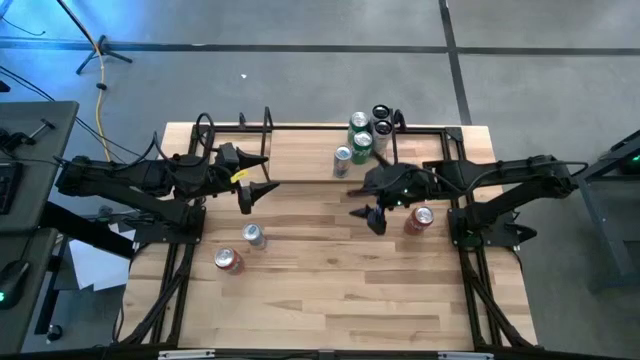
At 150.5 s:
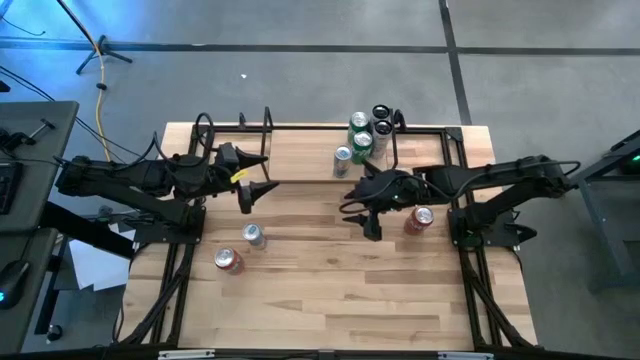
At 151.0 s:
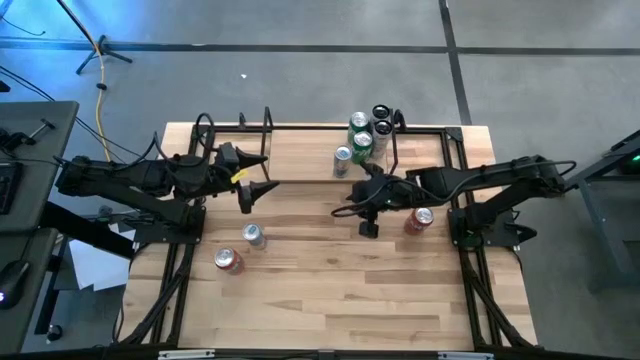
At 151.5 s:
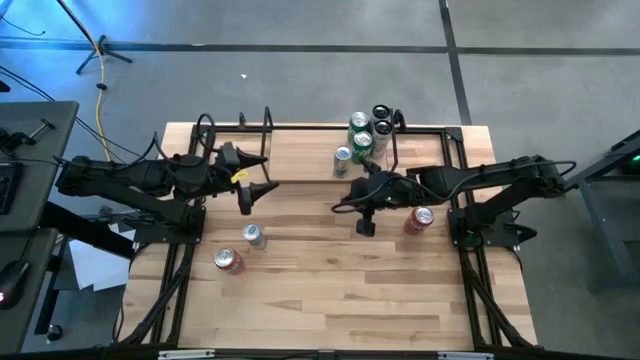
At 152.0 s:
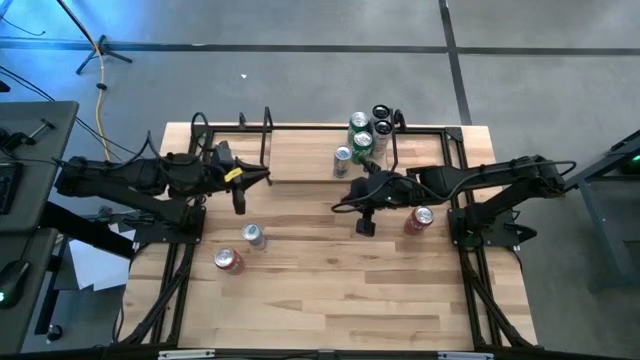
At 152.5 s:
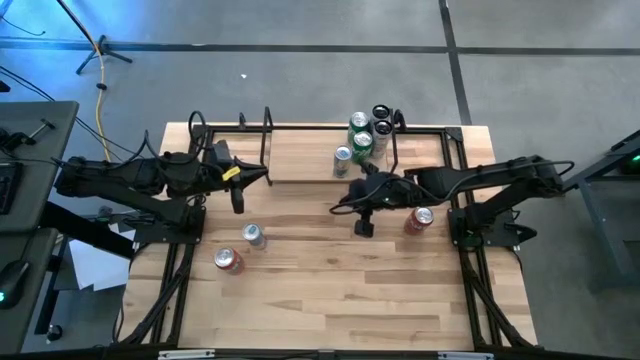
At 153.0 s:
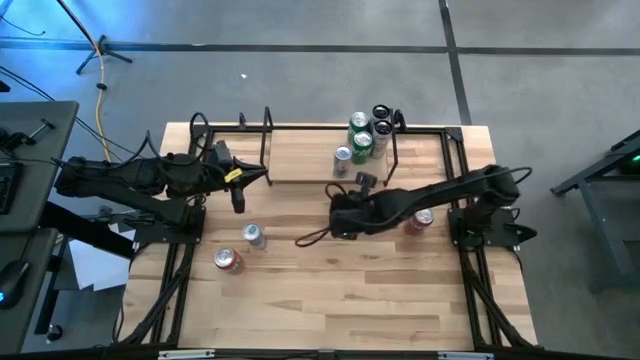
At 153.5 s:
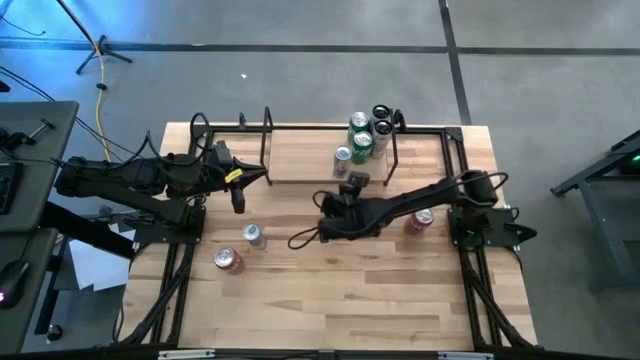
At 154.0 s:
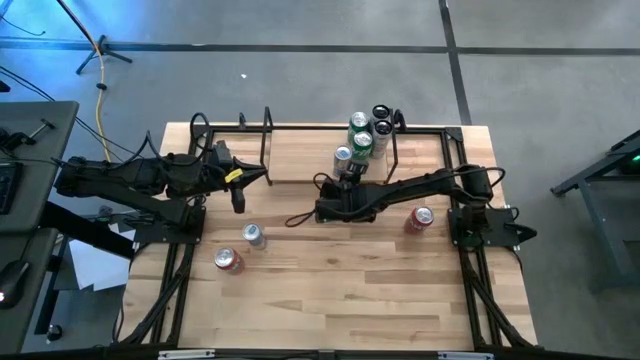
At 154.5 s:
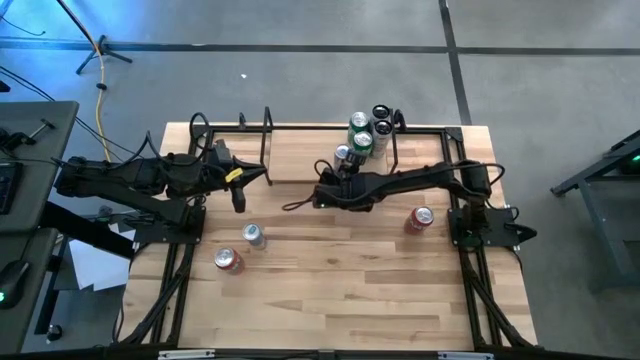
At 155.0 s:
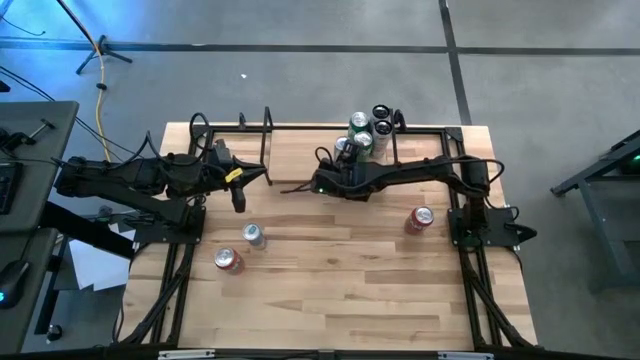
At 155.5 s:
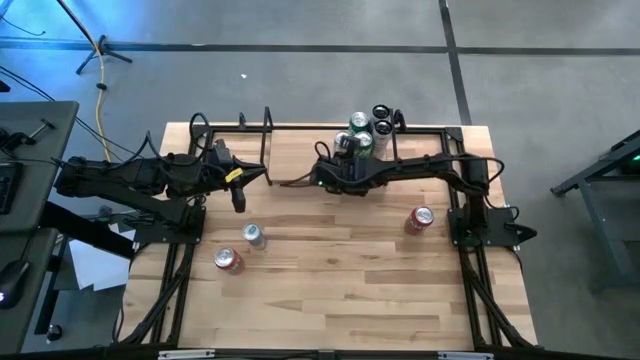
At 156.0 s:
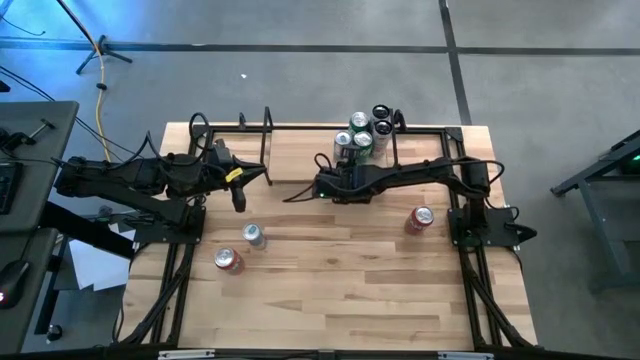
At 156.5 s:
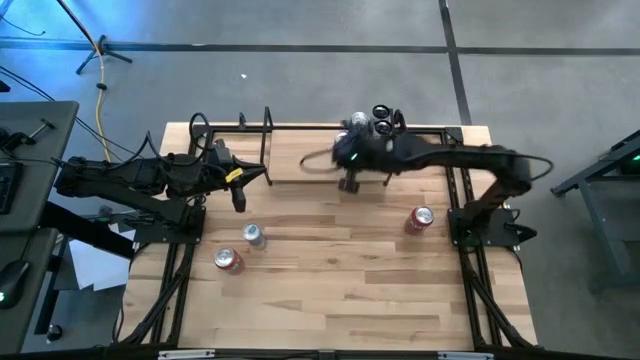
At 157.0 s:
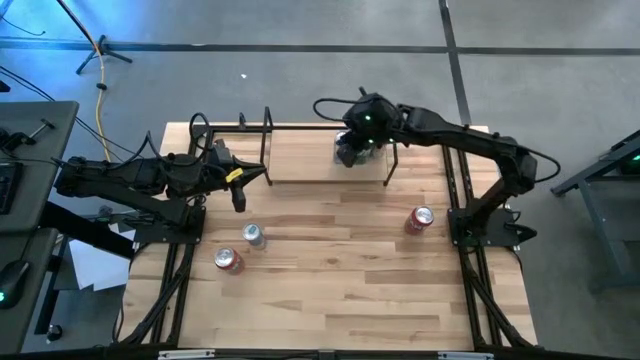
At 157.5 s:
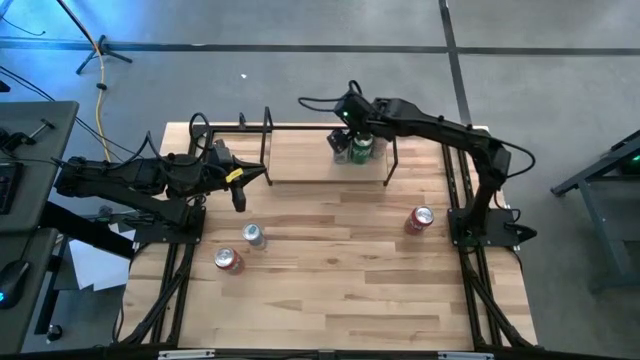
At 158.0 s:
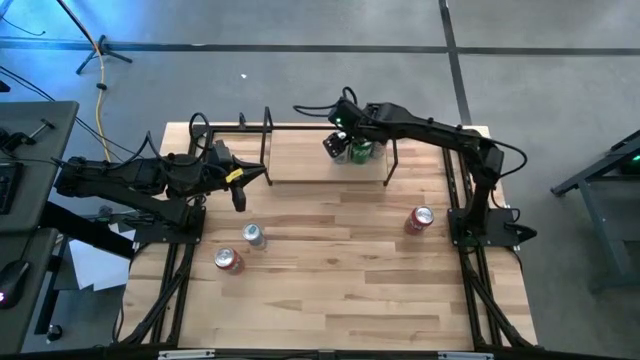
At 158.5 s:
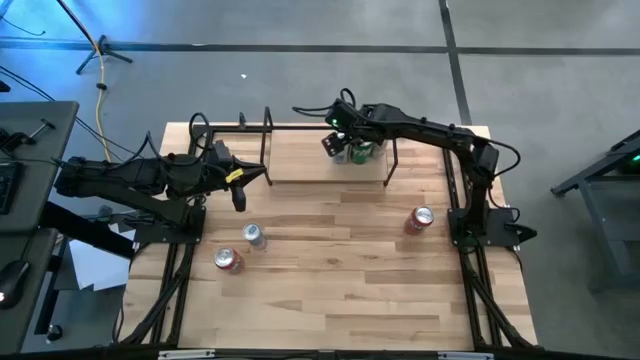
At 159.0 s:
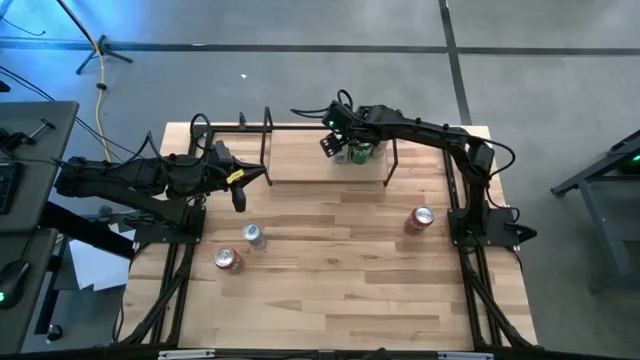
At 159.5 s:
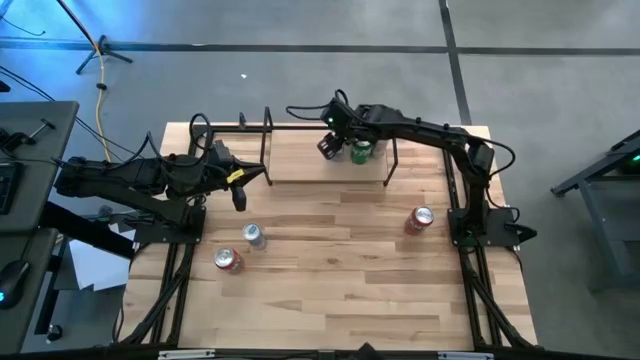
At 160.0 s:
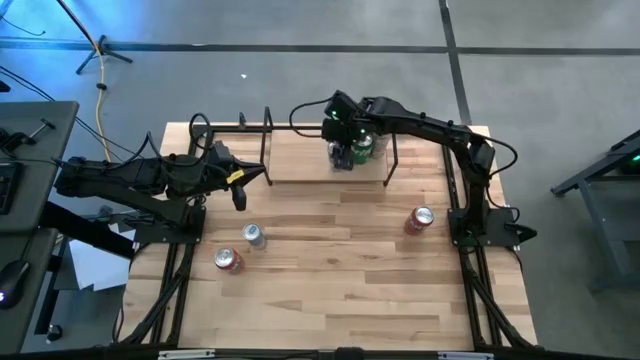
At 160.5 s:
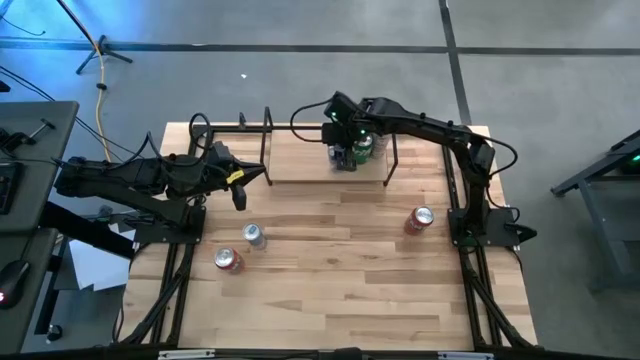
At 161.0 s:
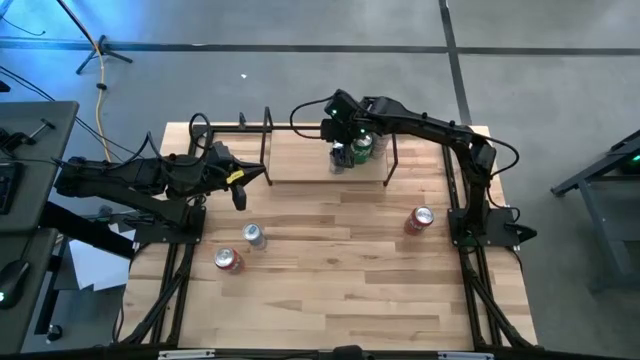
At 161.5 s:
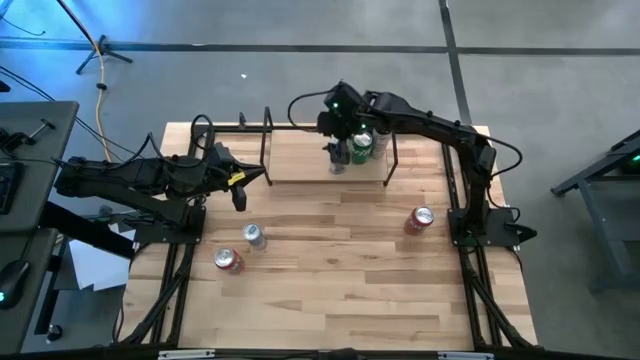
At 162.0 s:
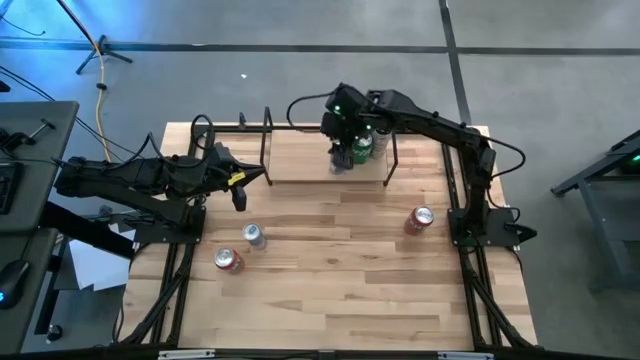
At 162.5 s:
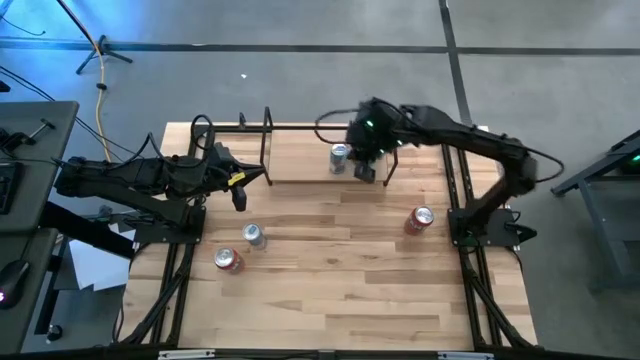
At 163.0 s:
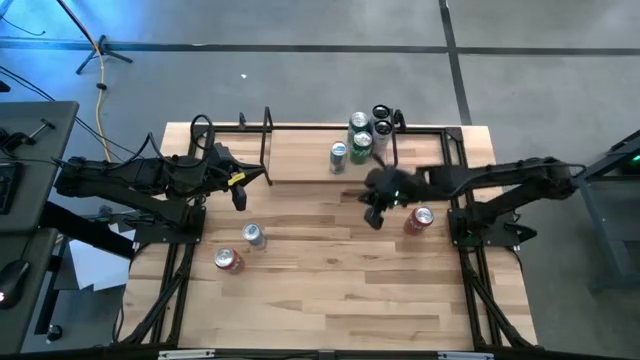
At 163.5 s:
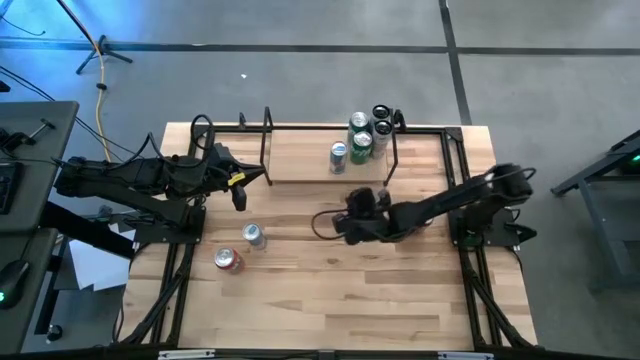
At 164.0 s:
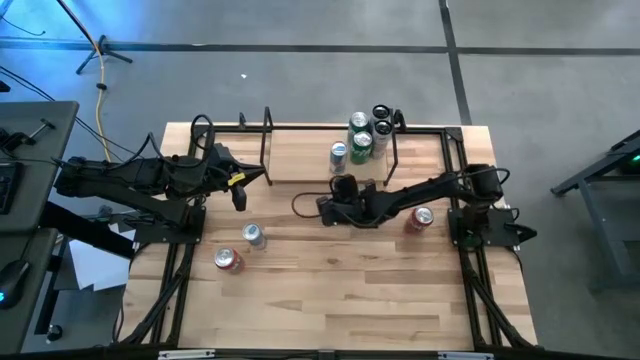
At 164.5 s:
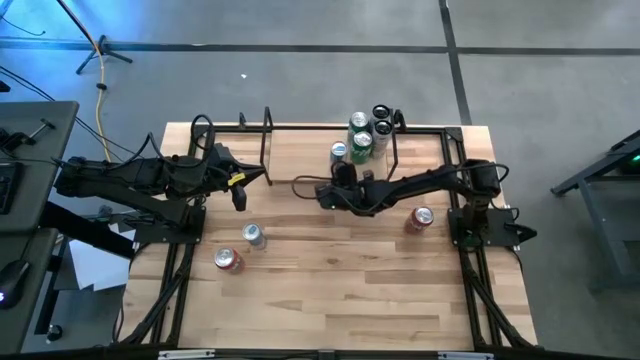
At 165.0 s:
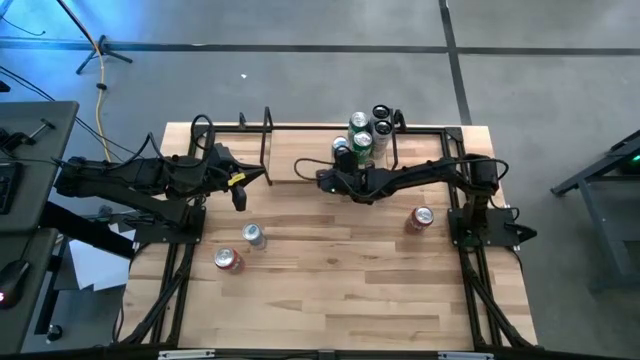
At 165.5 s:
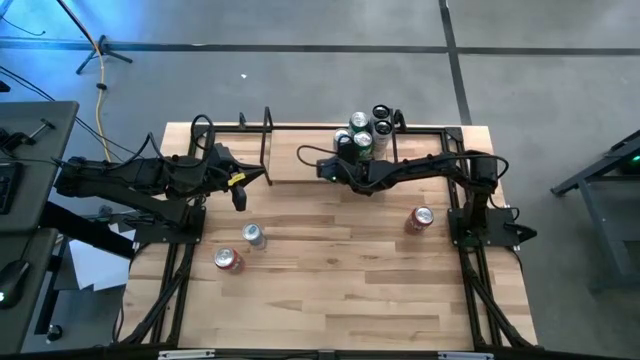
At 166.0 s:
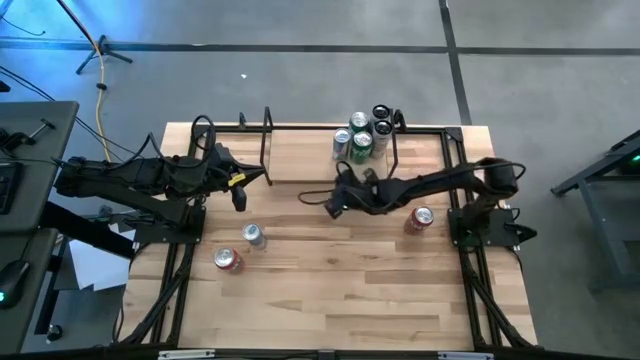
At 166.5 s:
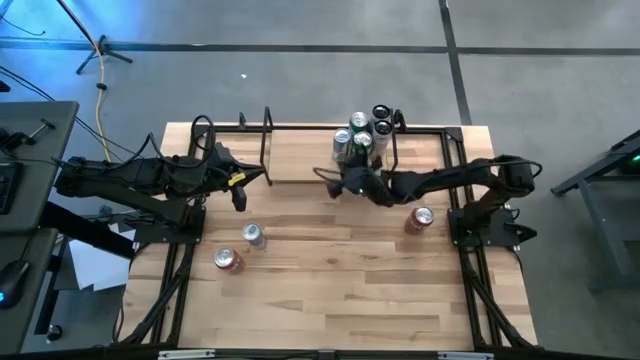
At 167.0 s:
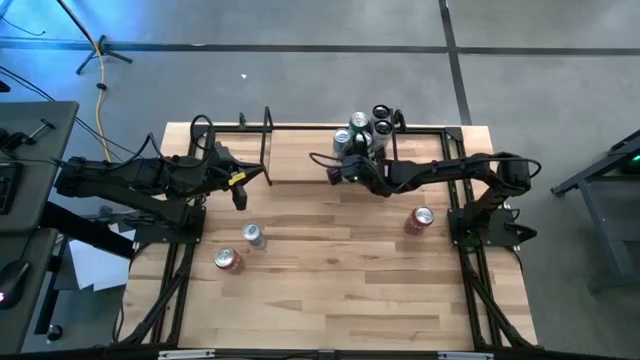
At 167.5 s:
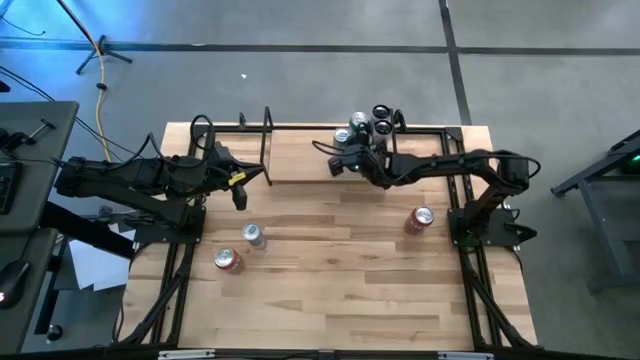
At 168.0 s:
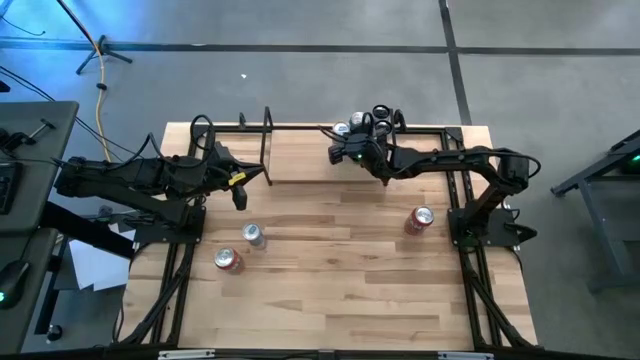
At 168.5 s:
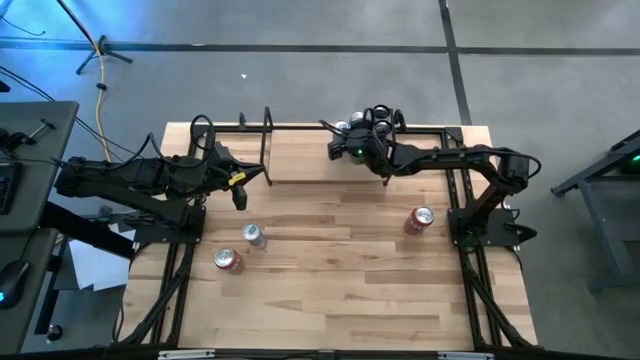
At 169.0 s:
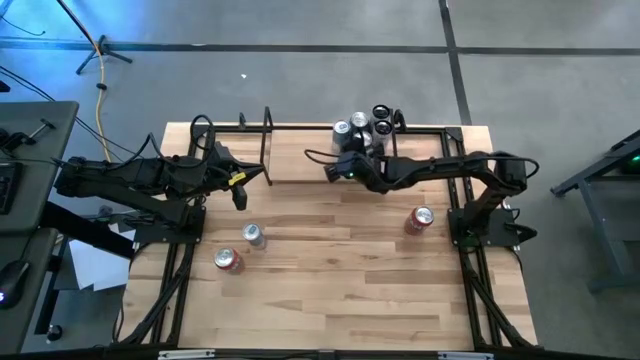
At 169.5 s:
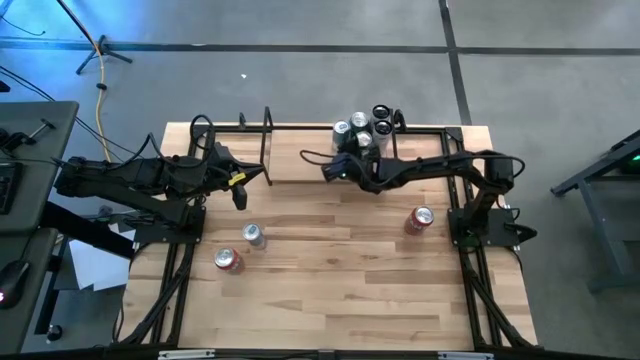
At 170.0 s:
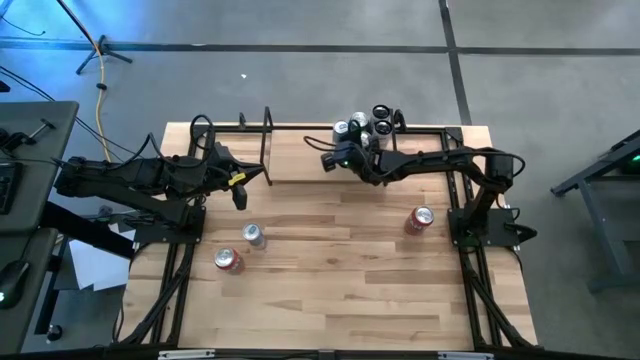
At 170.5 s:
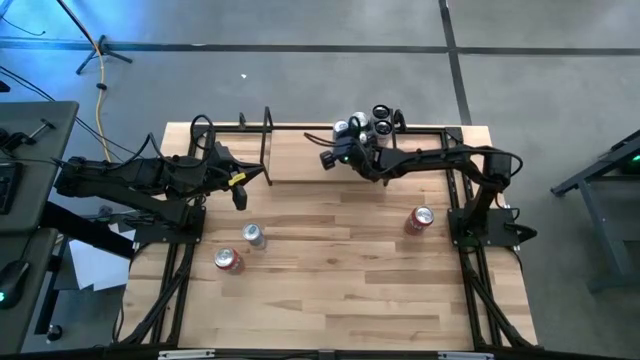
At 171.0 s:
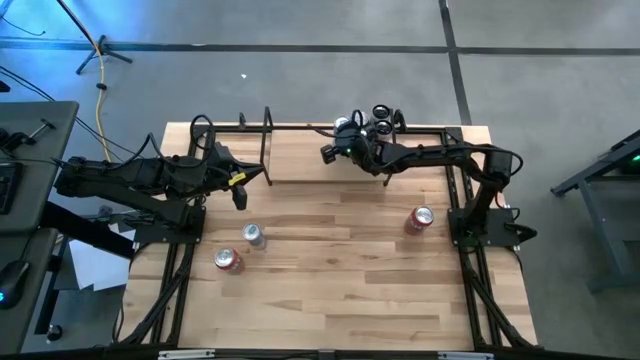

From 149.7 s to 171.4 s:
Task: Place canned beverage on shelf
Put the right blue soda can on the shelf
